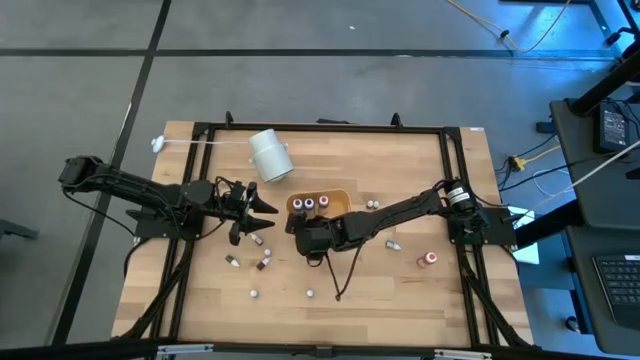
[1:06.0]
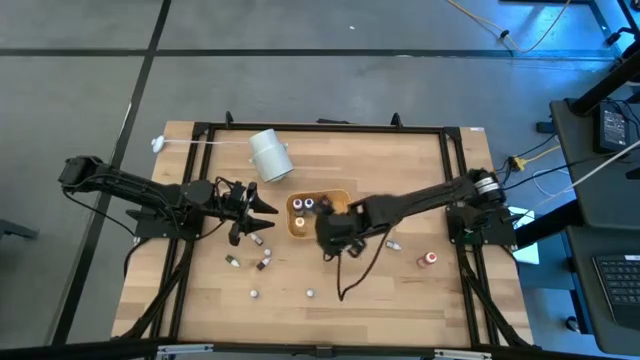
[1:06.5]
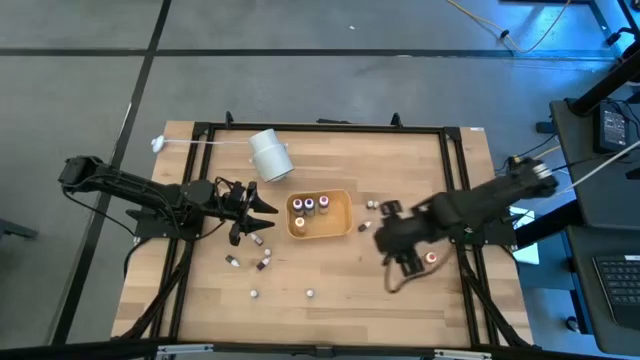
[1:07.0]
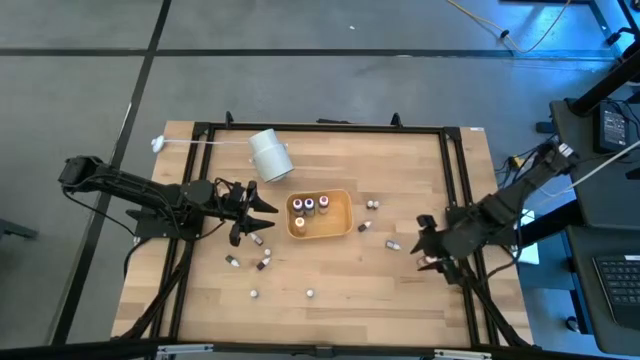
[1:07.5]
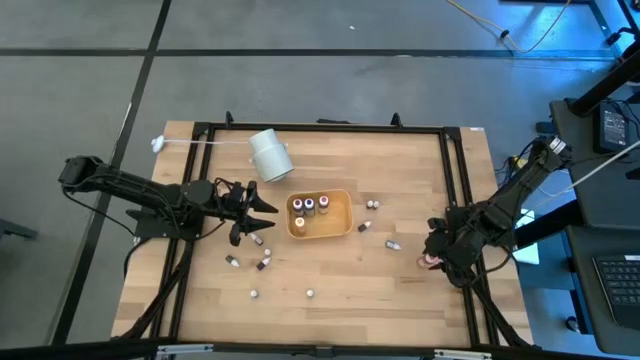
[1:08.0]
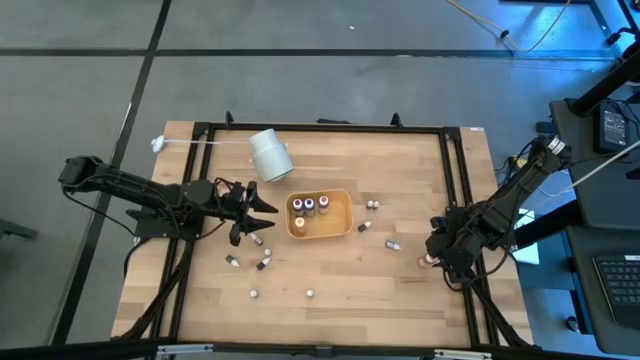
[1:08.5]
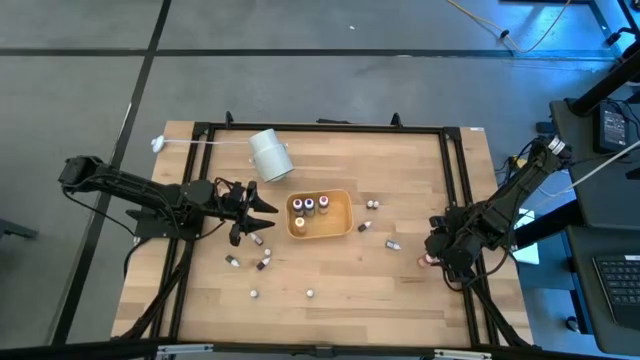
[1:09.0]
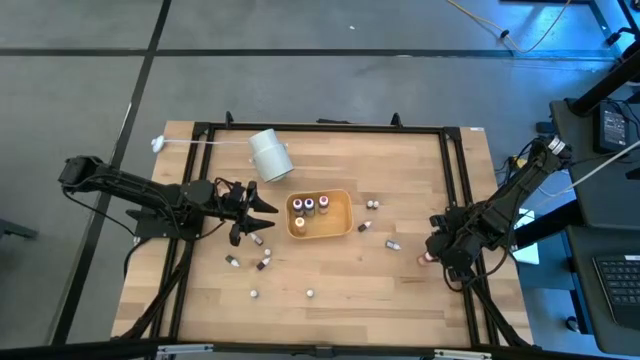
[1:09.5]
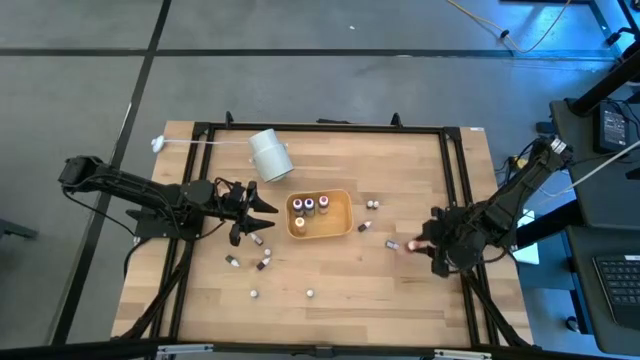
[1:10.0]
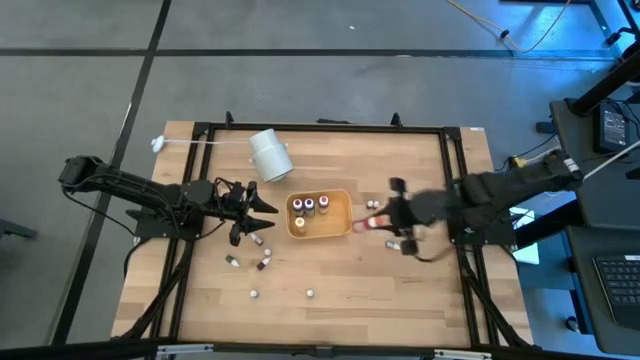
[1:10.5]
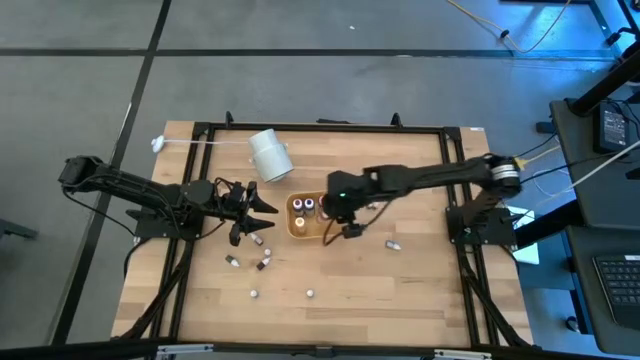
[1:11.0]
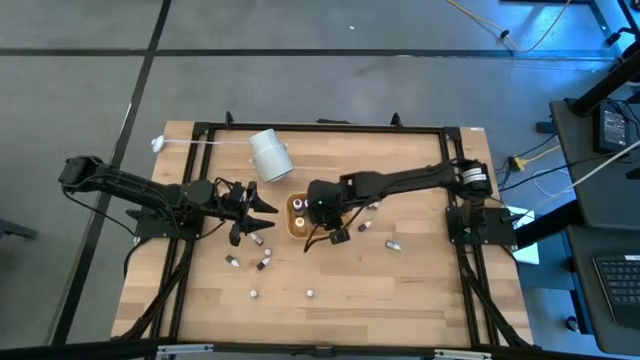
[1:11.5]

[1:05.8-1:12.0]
Task: Pick & Place food coloring
Put the large orange ink bottle into the yellow bin

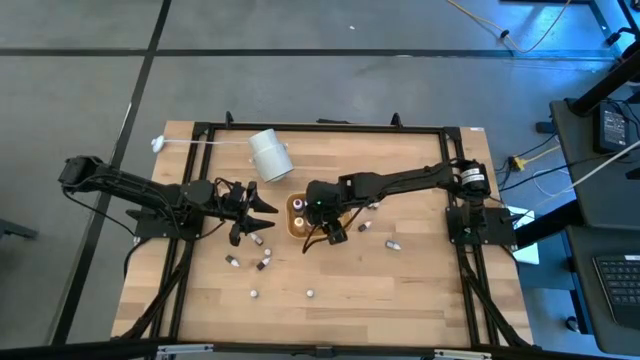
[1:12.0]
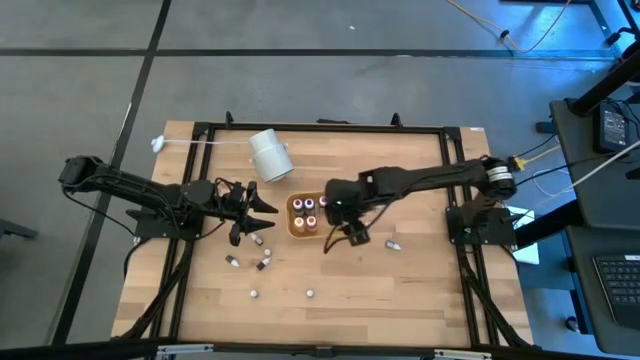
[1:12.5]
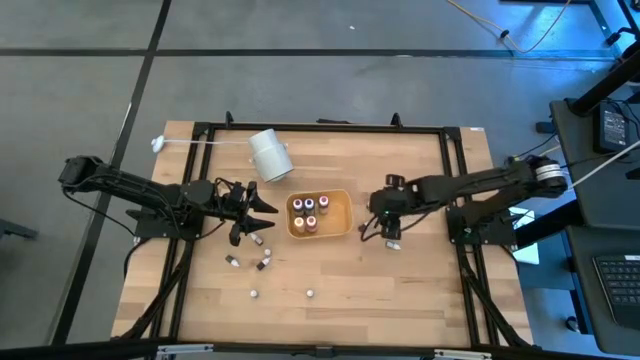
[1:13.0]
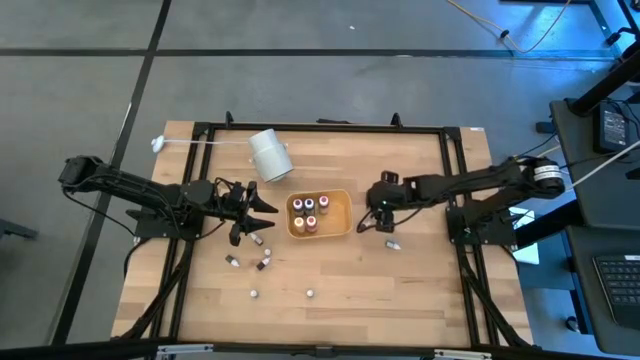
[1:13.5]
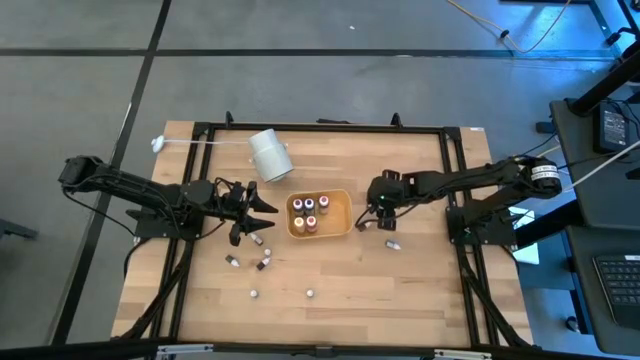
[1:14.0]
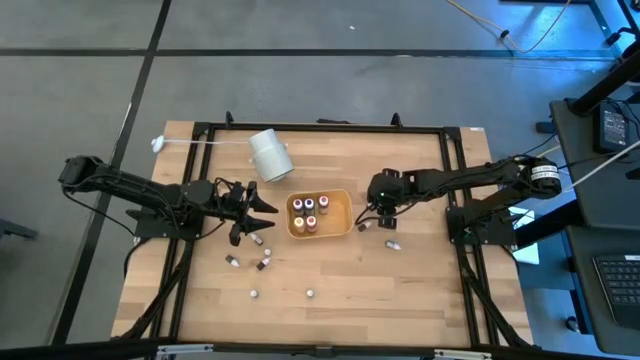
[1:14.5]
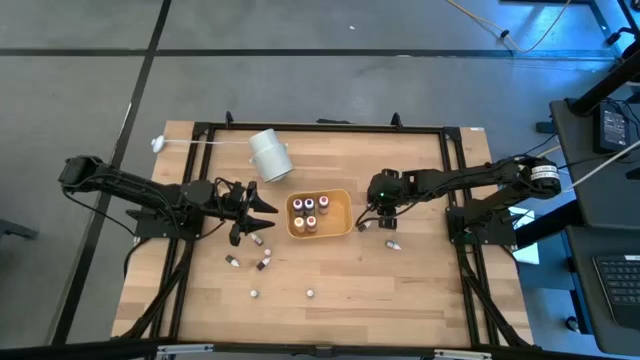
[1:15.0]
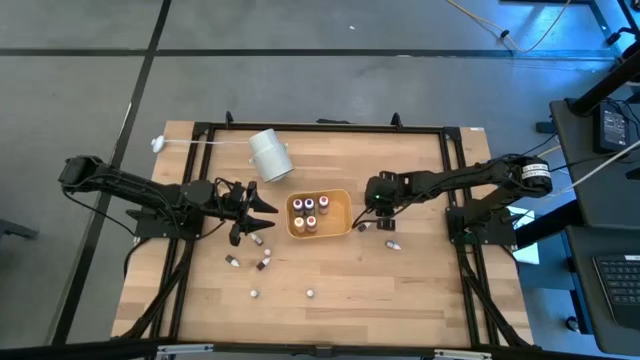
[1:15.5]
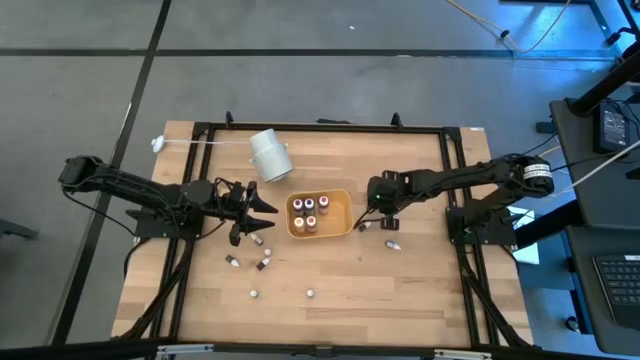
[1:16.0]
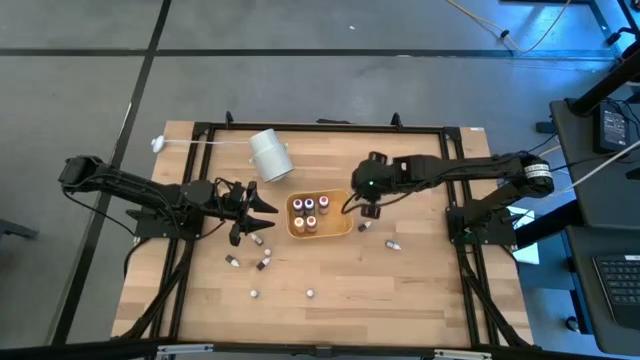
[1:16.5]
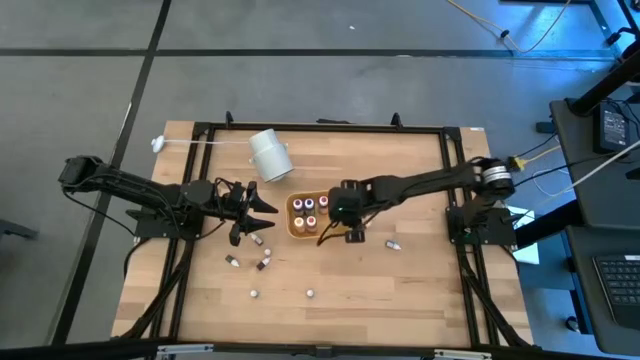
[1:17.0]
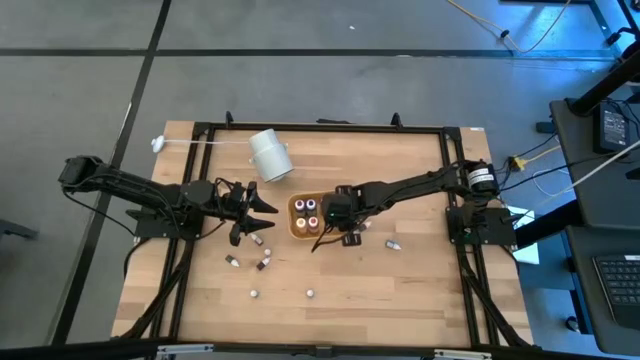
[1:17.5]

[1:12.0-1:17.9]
Put the small black ink bottle into the yellow bin

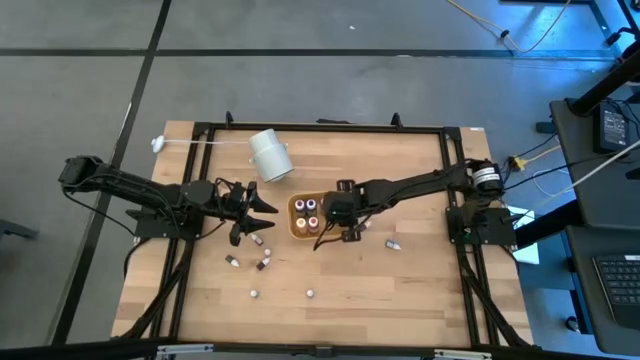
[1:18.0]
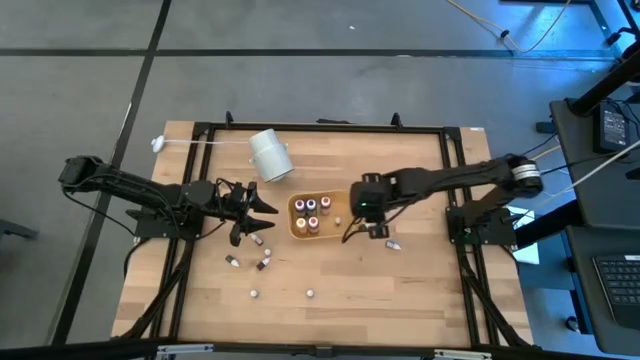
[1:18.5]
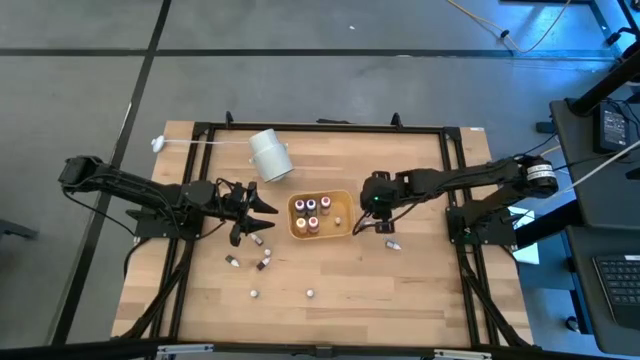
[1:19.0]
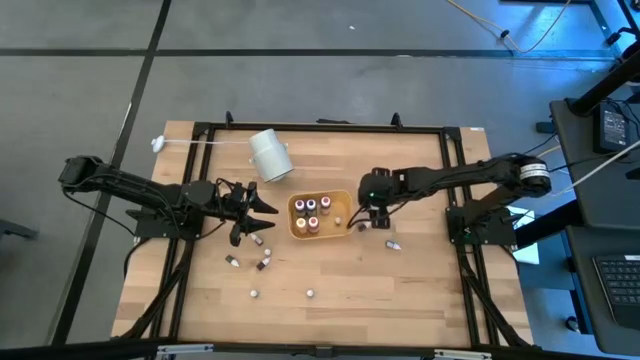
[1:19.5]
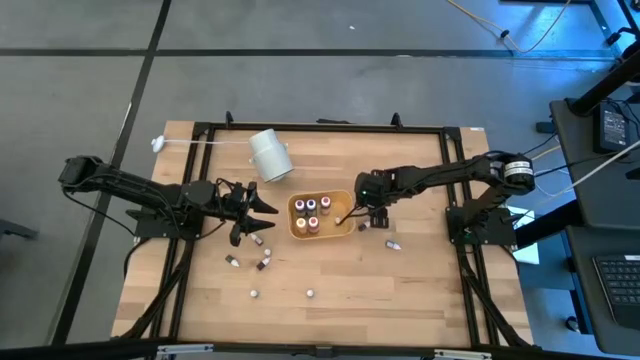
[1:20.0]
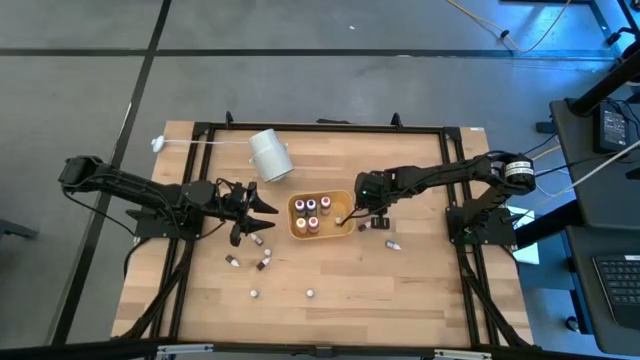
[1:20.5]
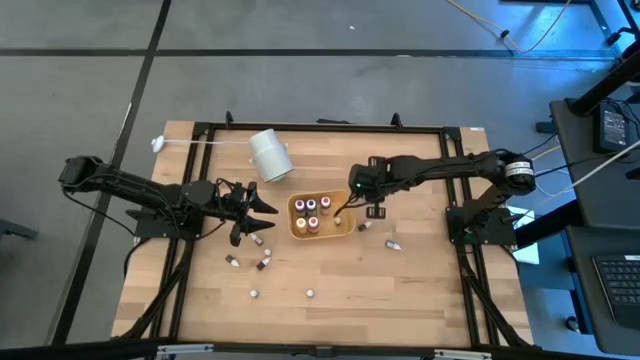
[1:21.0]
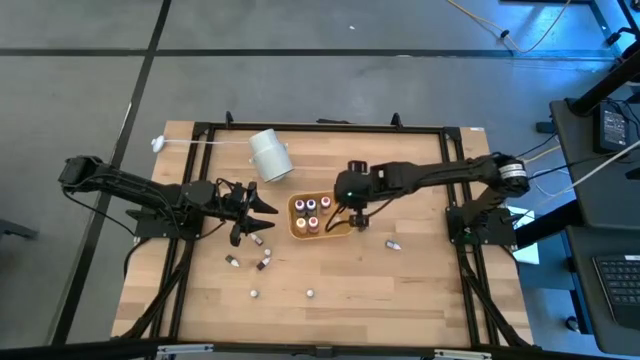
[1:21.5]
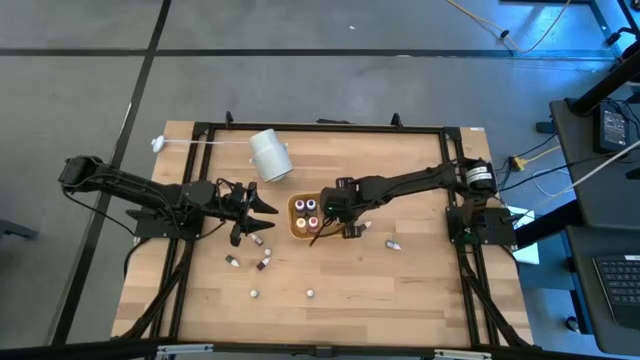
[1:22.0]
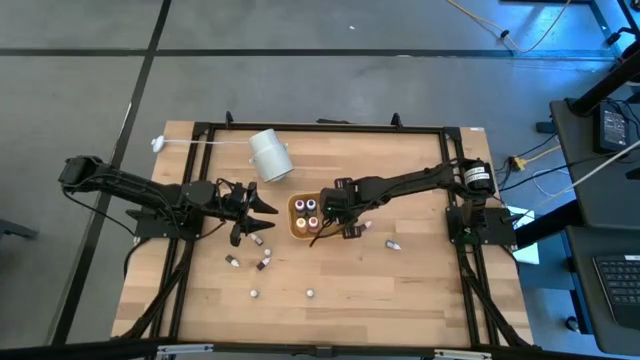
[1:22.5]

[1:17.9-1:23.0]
Put the small black ink bottle into the yellow bin

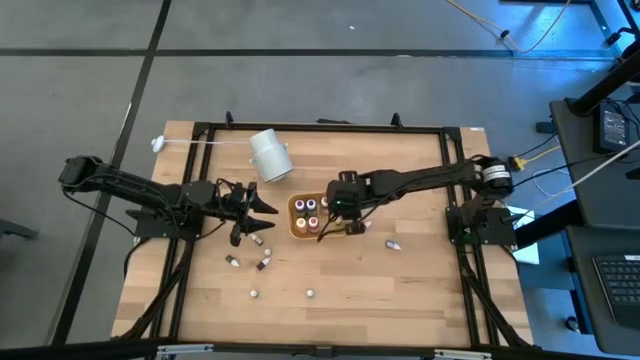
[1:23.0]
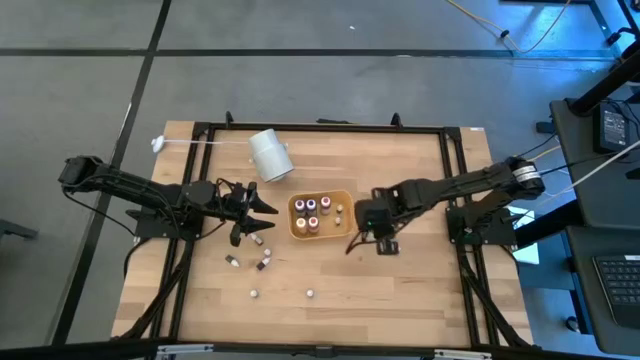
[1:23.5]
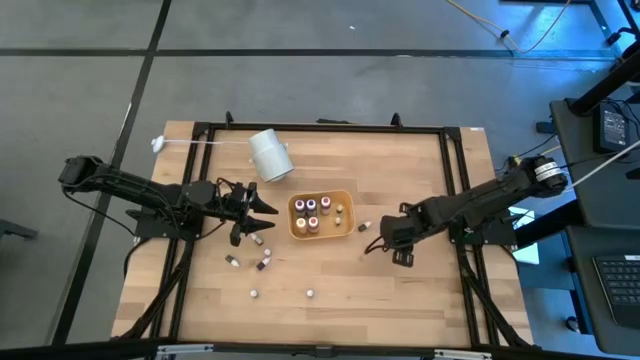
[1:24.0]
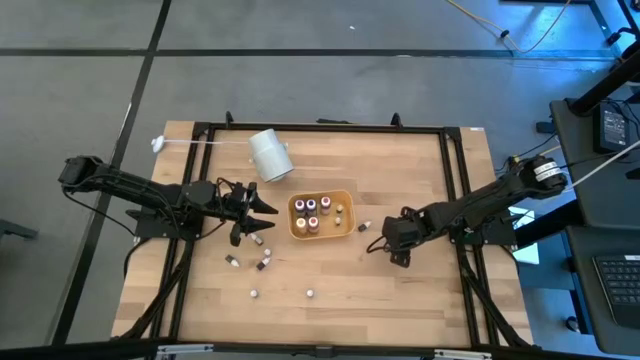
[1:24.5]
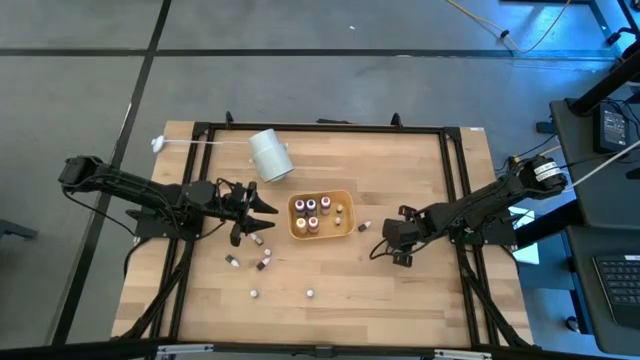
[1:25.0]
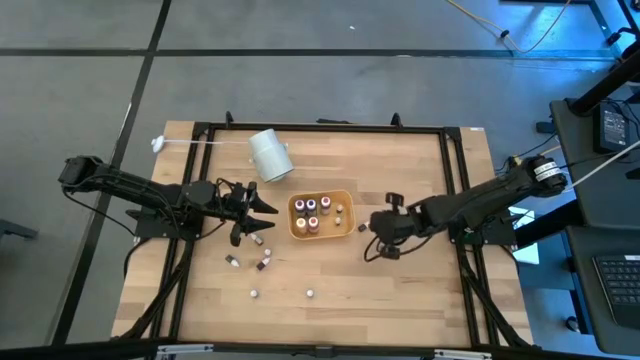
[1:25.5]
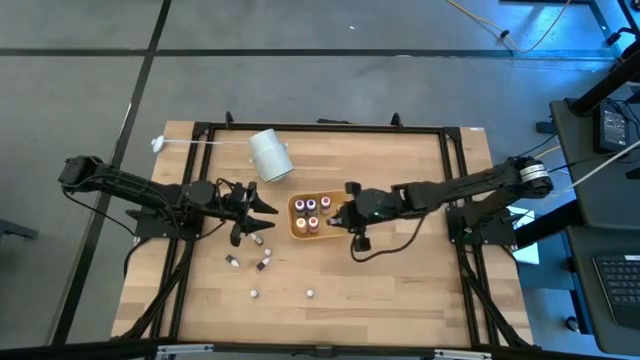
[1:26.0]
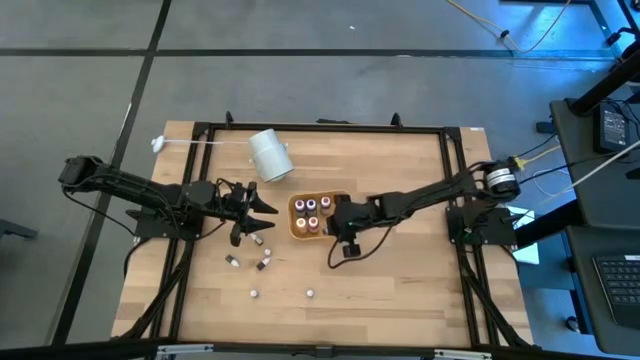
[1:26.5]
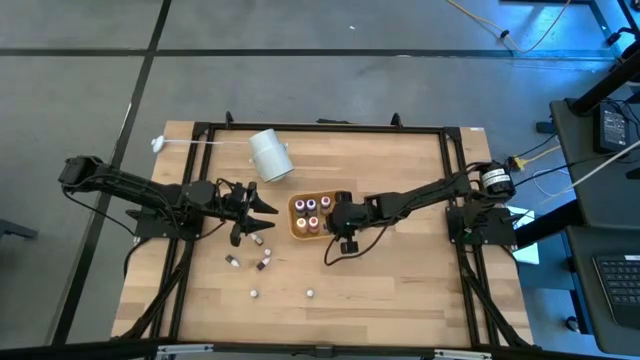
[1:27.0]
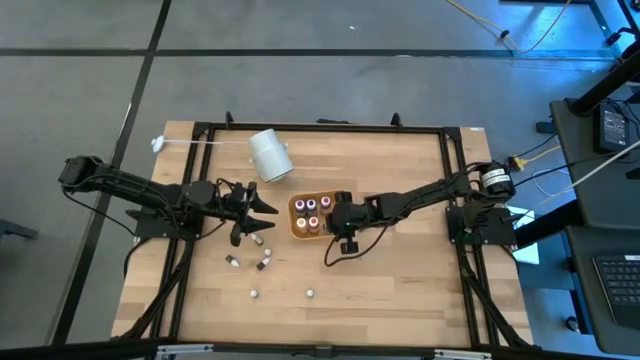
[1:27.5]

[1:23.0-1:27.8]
Put the small black ink bottle into the yellow bin
